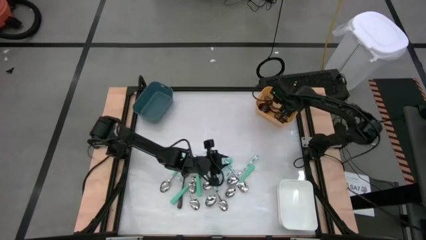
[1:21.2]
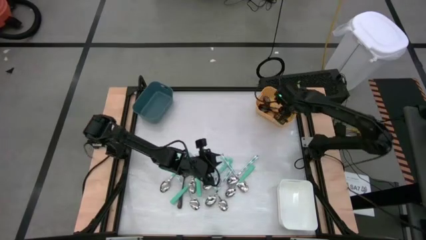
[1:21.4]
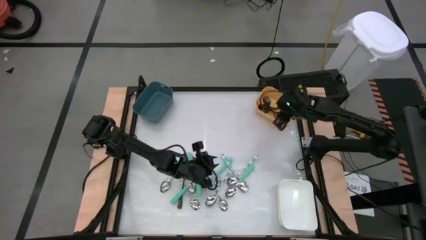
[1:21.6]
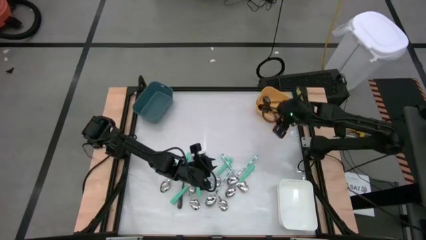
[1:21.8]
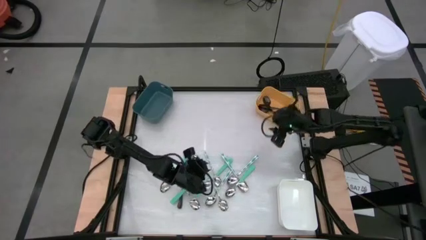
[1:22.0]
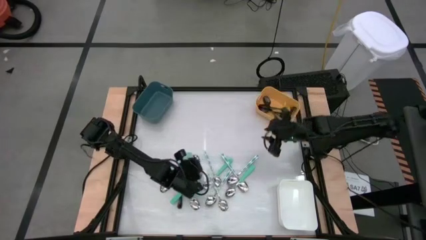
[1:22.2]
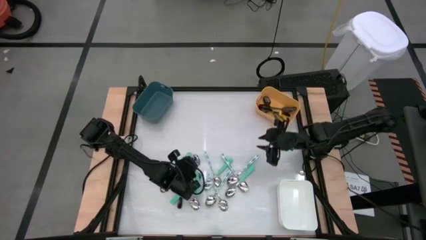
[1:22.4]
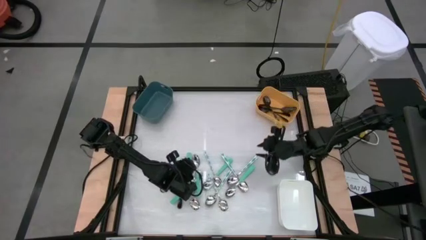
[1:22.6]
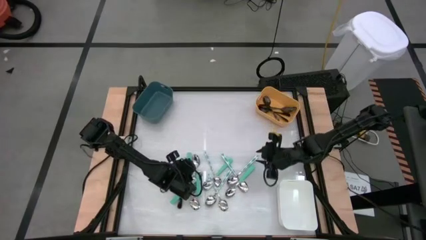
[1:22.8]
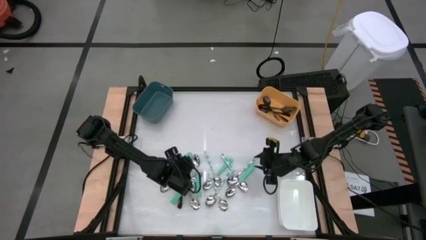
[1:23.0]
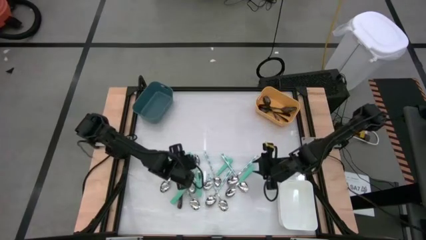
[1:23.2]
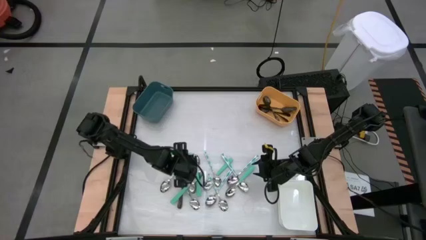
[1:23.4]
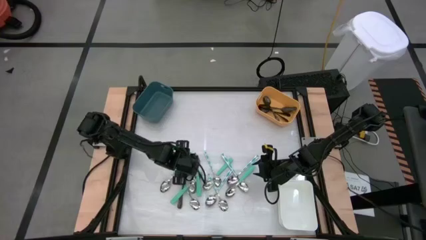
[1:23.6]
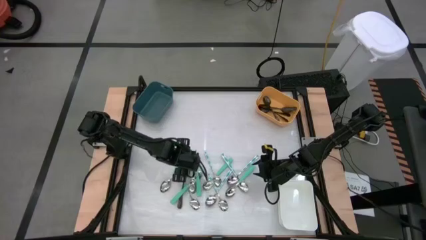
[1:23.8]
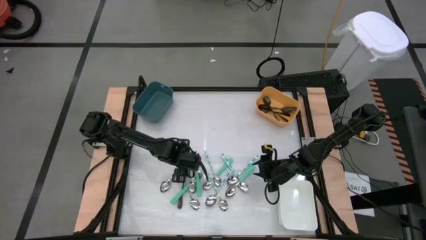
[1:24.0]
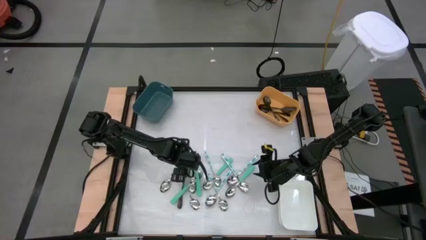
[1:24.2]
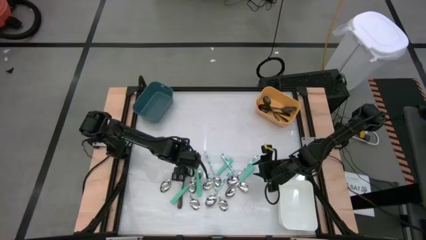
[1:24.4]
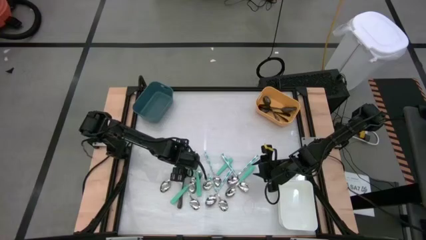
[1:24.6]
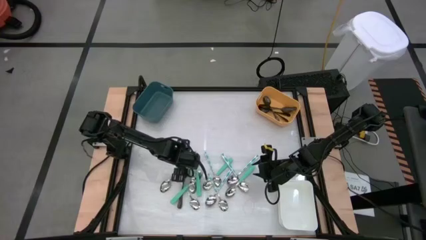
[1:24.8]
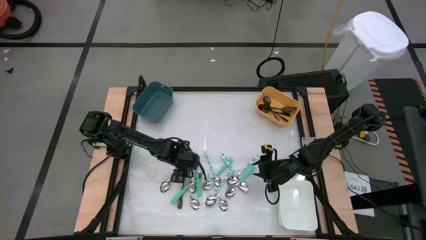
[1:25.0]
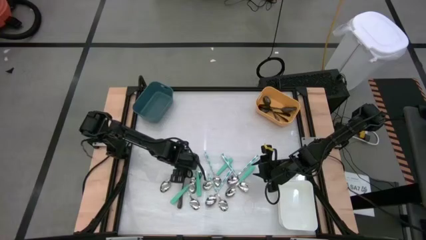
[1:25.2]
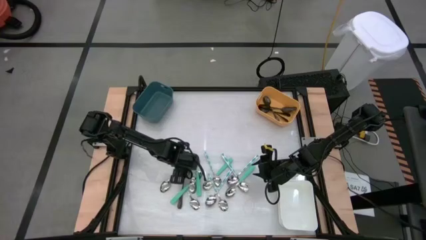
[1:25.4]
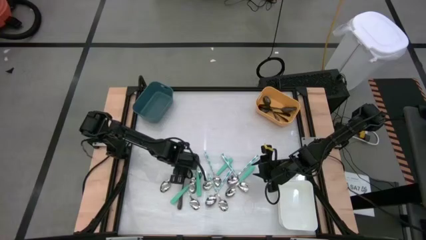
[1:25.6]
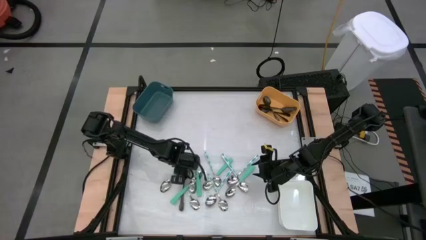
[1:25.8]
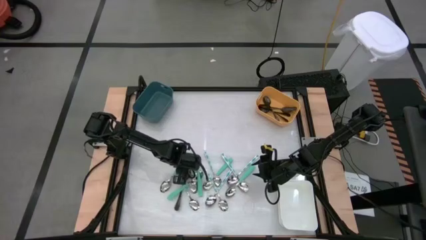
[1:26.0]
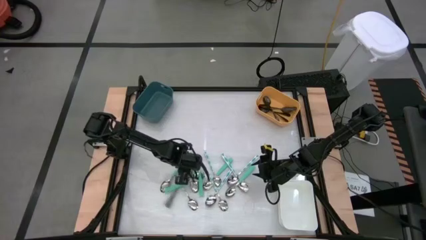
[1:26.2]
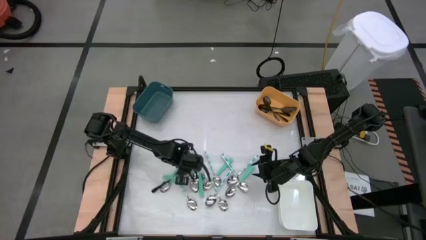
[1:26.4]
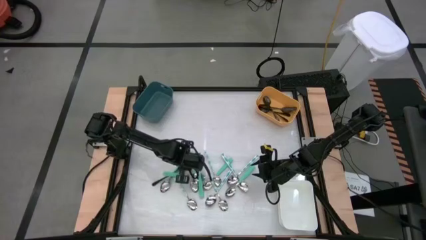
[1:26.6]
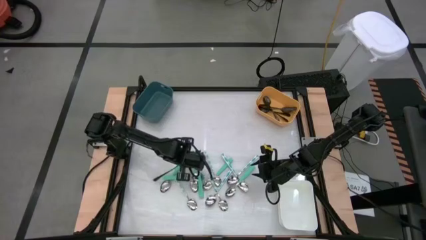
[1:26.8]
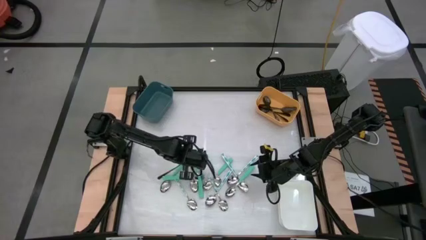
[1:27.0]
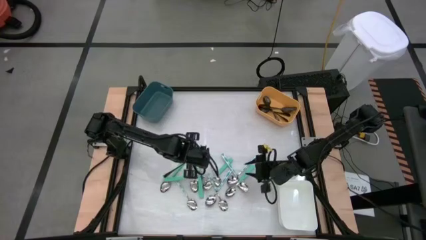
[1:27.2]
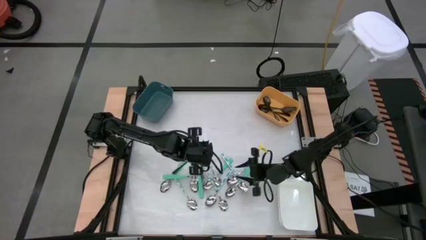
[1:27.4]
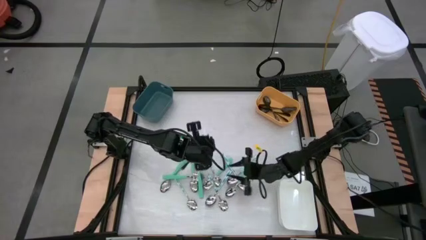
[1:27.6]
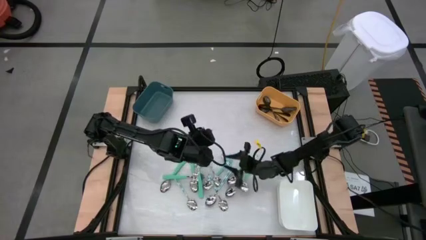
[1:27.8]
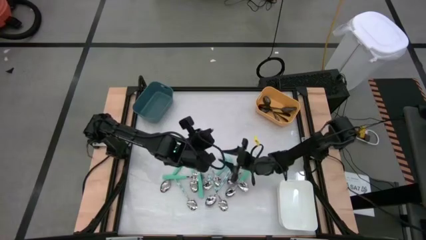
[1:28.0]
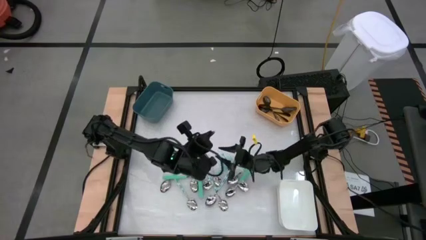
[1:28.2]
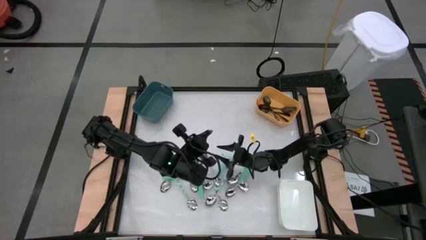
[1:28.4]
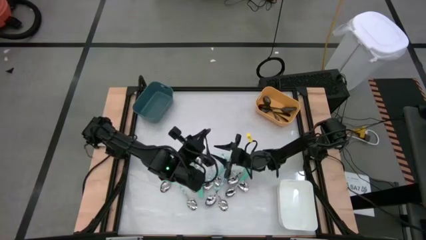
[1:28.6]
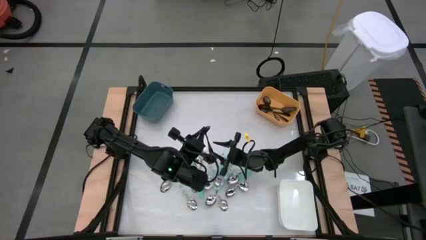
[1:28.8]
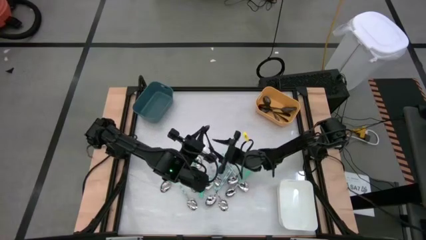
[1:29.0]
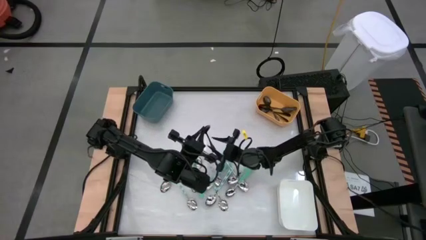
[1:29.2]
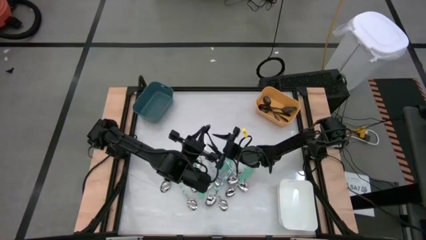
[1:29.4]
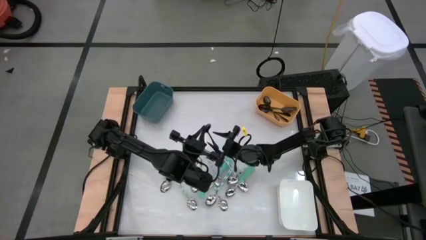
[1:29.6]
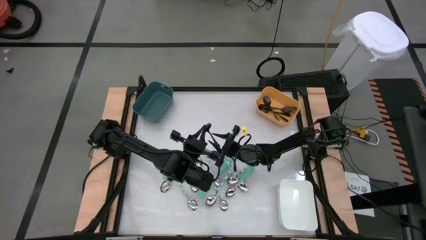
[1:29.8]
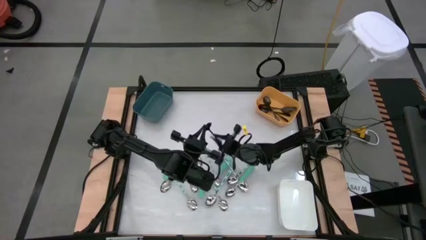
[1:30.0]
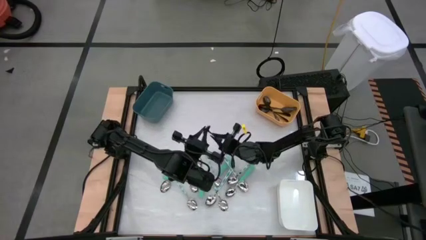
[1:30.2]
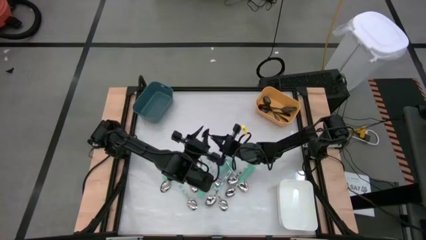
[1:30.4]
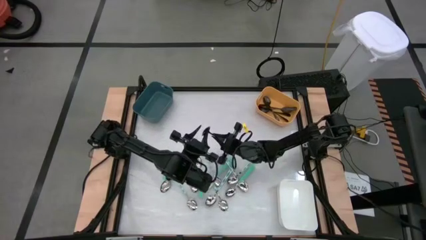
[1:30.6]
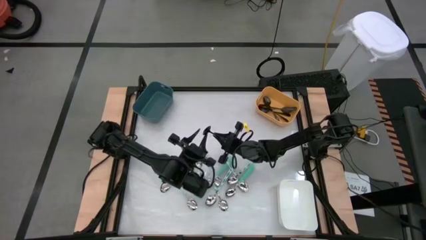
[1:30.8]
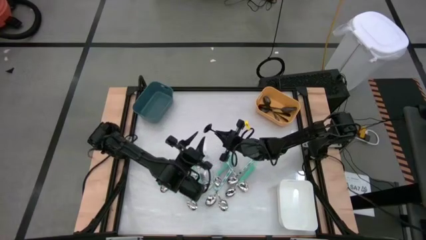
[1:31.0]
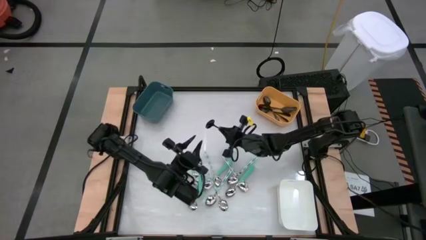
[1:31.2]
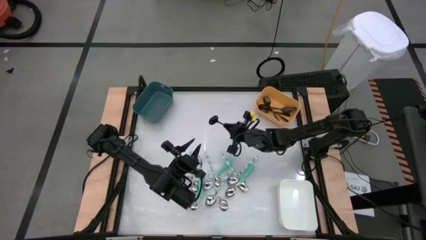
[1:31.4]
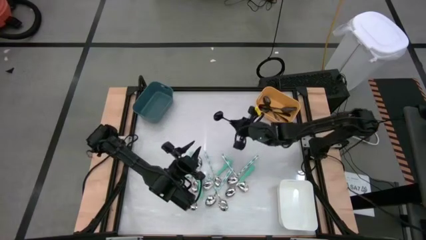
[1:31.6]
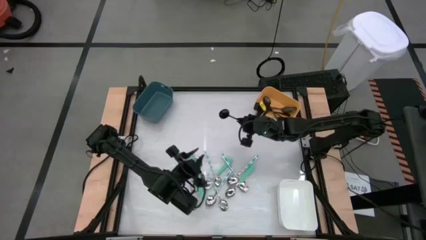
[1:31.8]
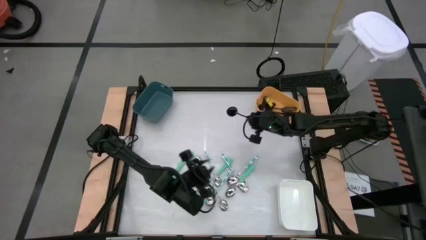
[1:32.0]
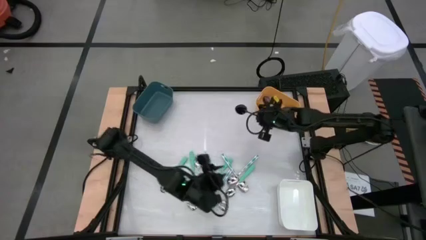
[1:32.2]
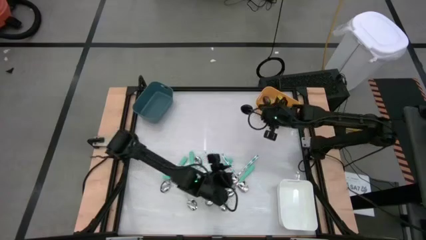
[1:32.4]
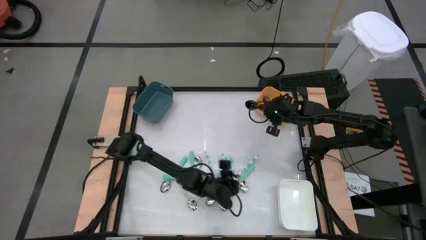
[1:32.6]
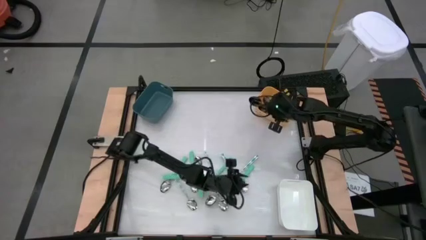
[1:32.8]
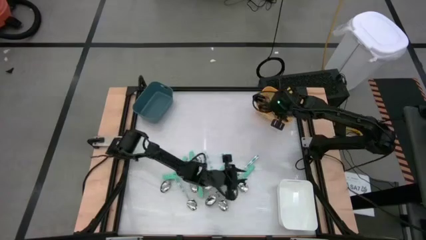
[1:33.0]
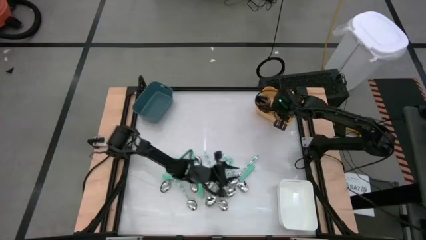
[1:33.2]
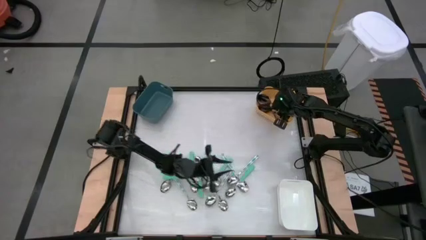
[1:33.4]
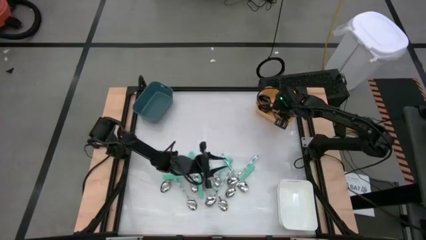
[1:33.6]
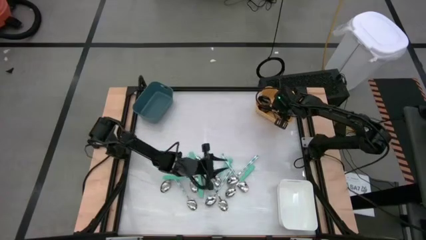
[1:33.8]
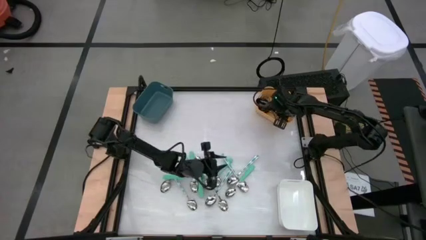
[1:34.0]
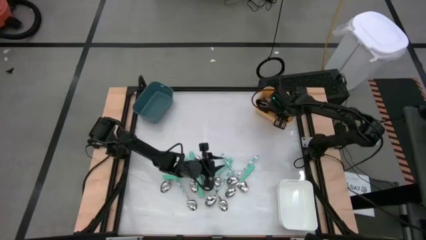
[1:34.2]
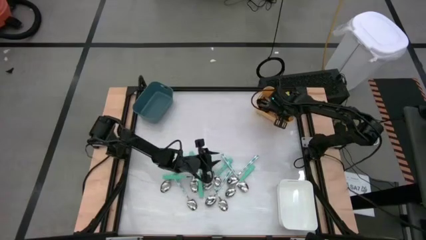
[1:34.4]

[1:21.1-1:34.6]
Task: Sort silverware by color (type)
Put the black spoon into the yellow bin

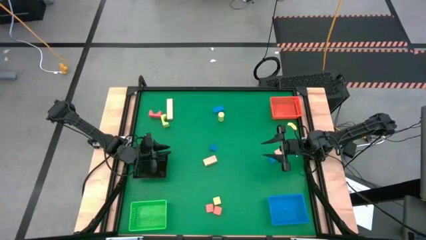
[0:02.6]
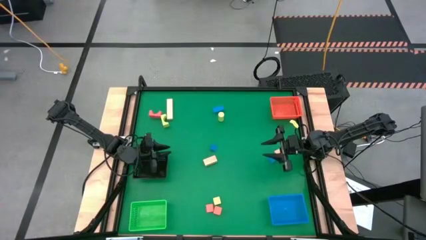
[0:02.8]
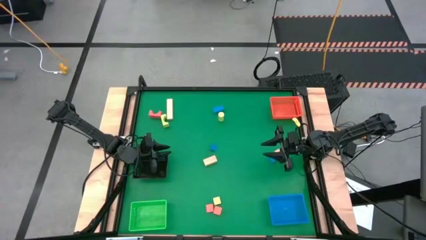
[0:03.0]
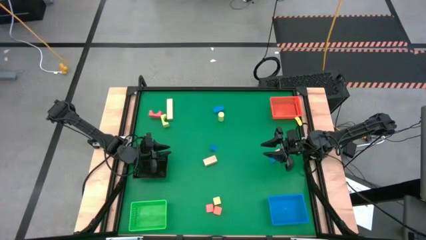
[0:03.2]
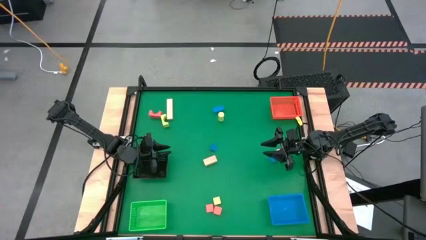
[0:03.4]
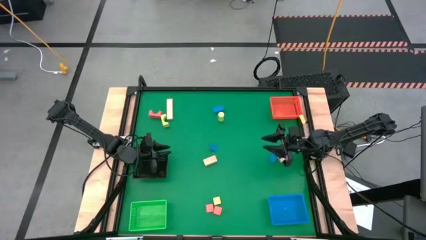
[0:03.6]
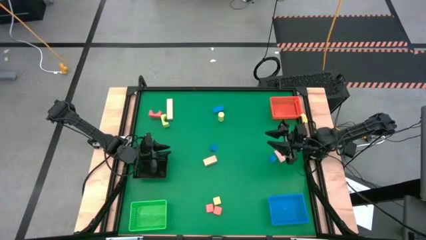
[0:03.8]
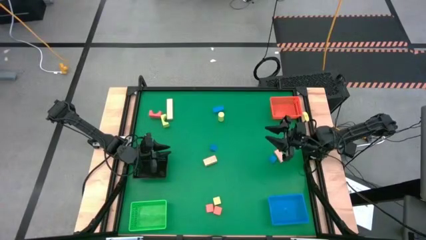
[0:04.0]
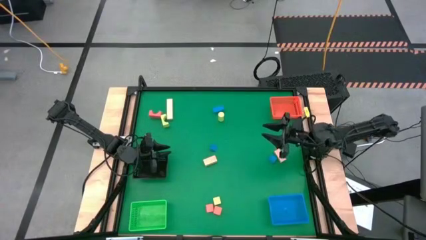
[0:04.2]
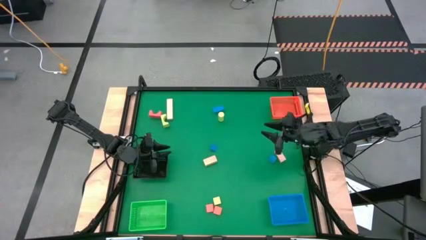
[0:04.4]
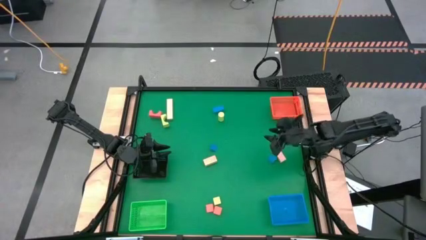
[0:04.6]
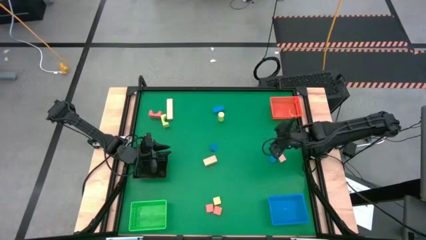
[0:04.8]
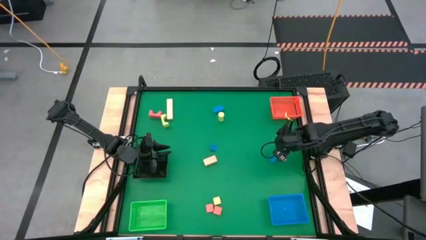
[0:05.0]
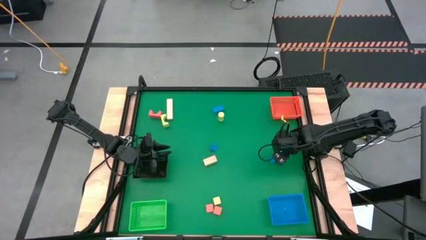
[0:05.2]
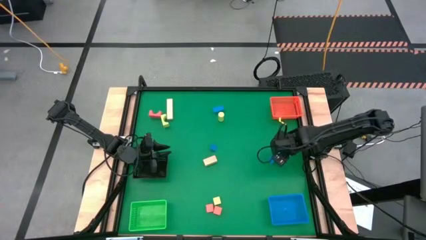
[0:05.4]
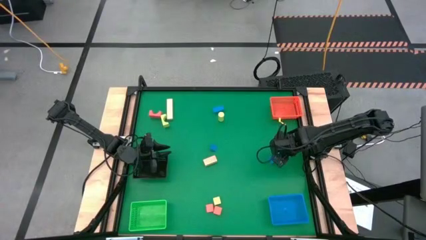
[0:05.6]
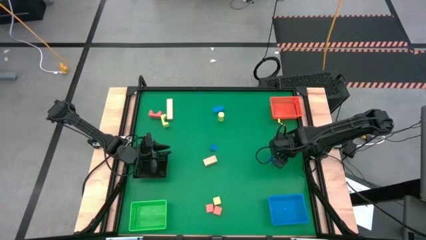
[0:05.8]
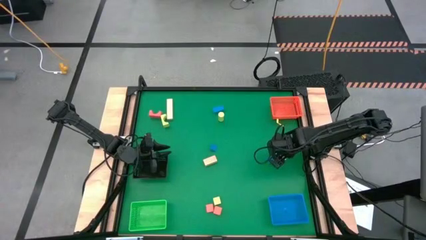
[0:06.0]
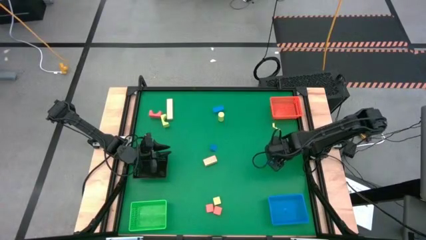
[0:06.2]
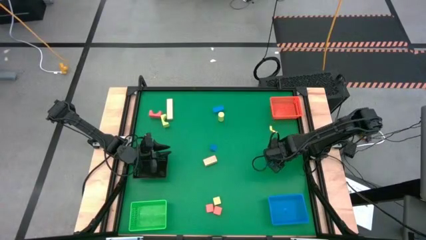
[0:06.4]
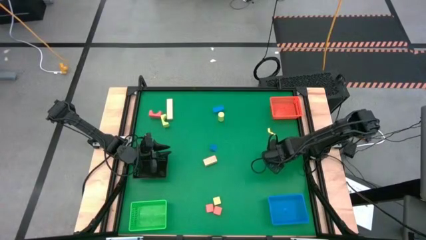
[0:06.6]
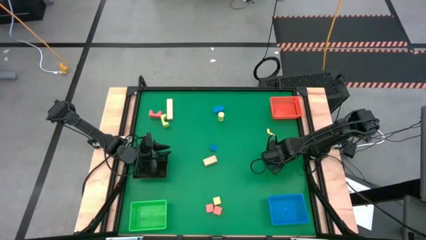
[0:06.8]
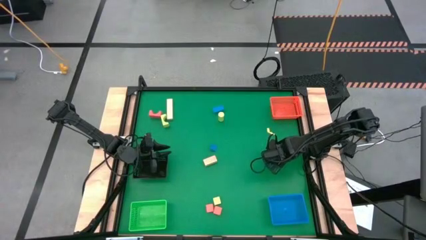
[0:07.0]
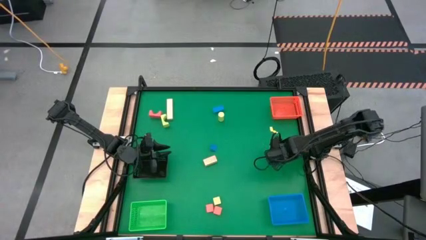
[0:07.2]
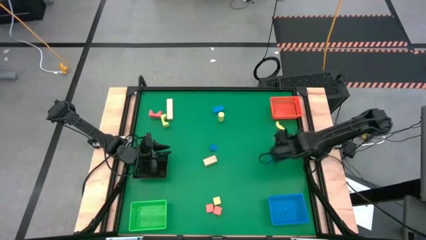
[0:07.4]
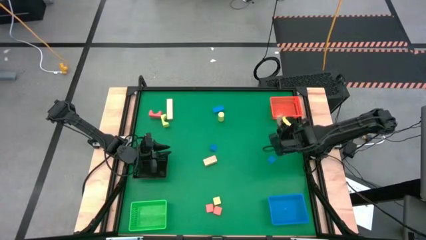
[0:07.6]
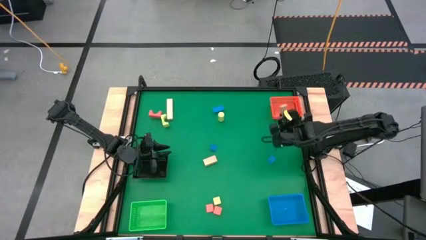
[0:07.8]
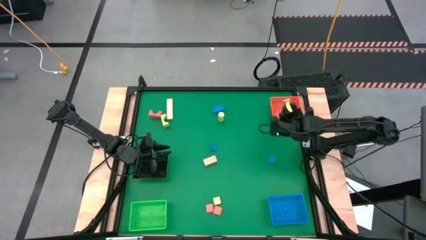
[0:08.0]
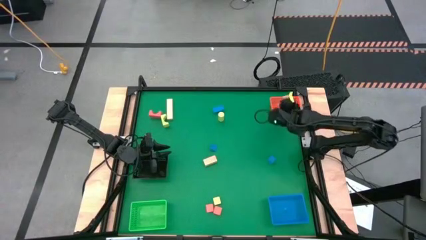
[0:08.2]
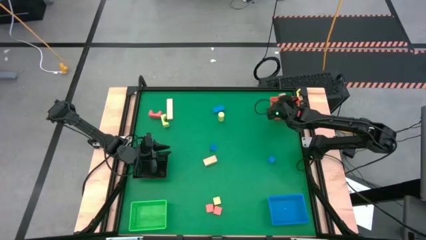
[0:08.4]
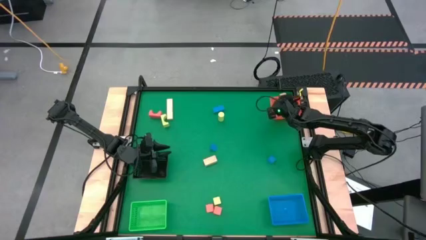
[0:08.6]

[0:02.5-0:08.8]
Task: Sort & place blocks by color
Put the right white wooden block into the orange basket
